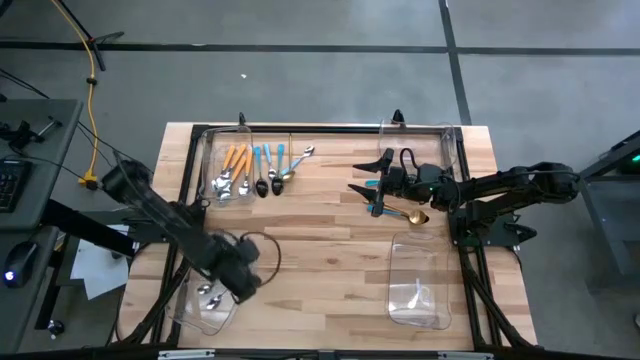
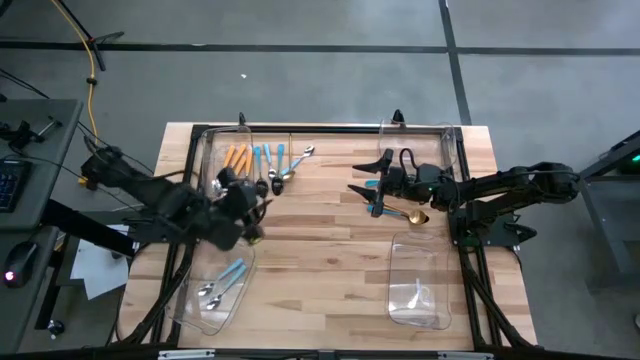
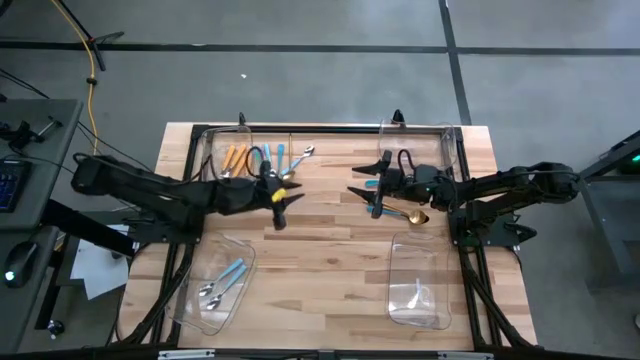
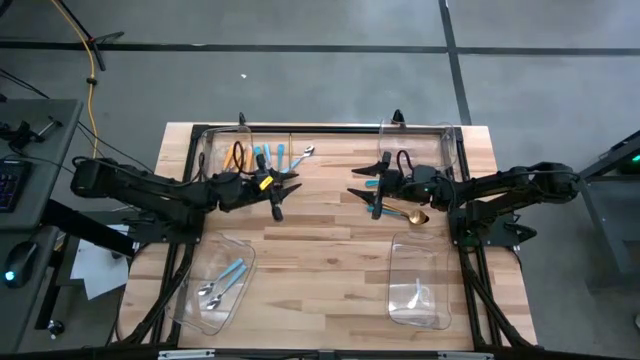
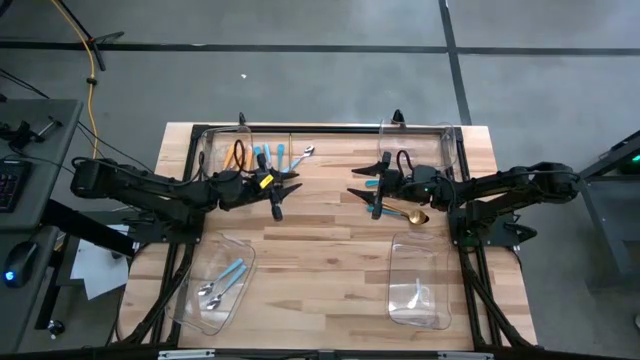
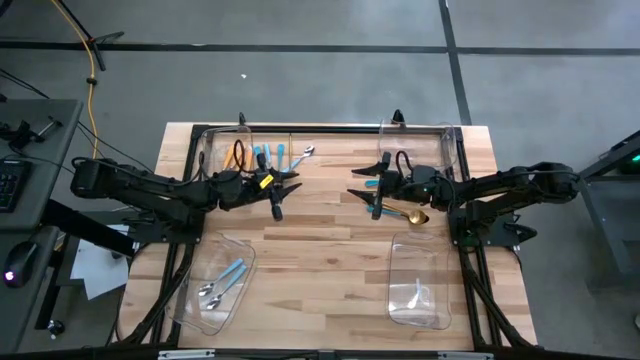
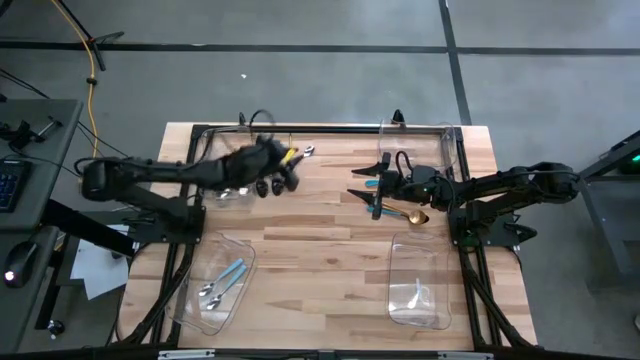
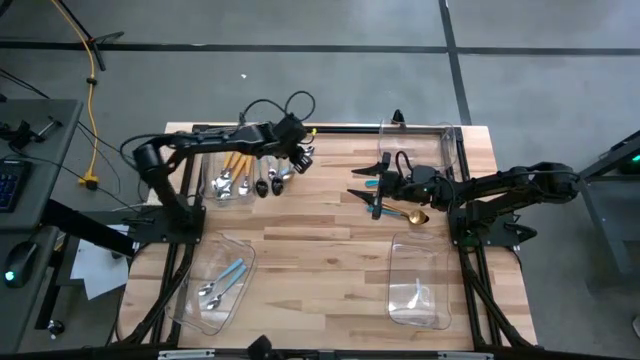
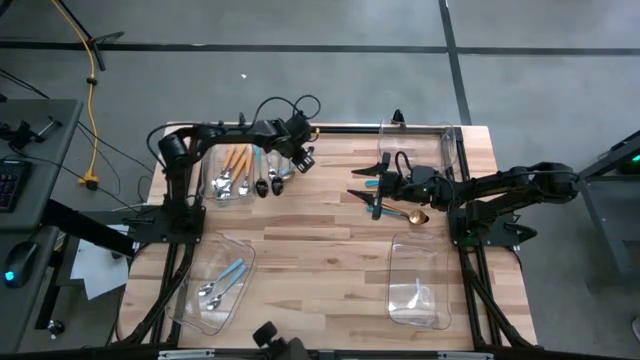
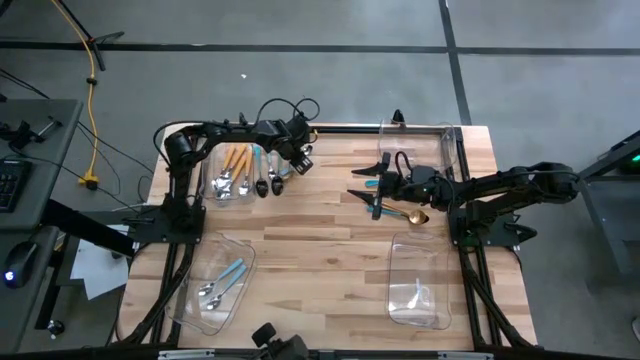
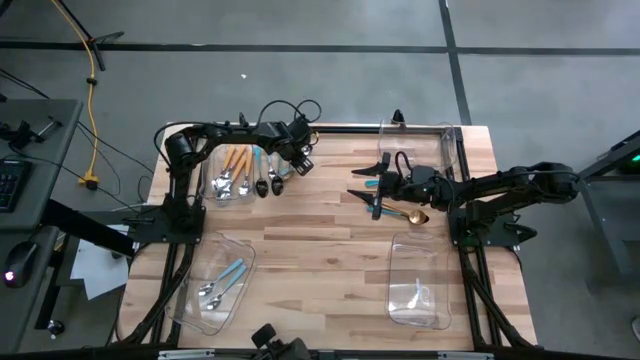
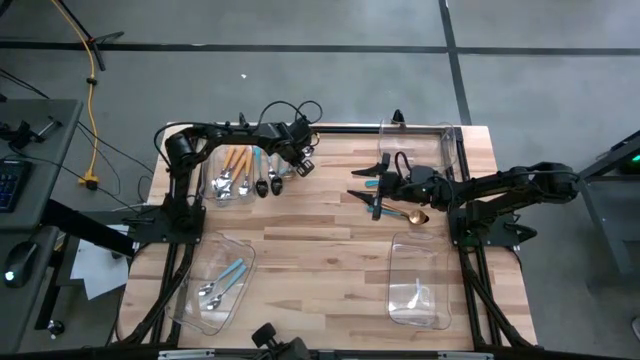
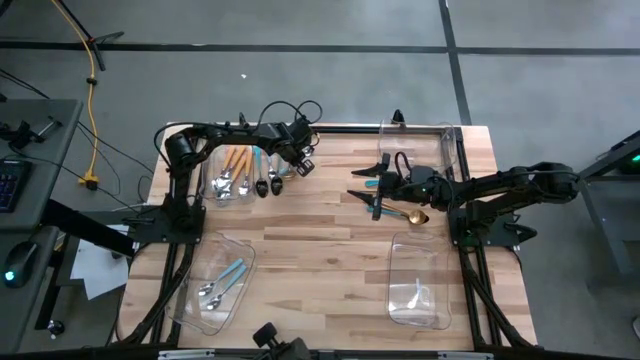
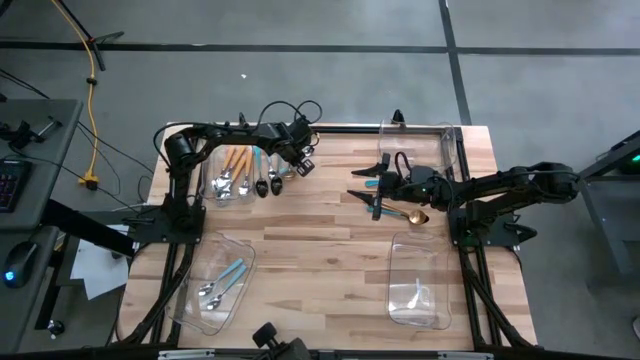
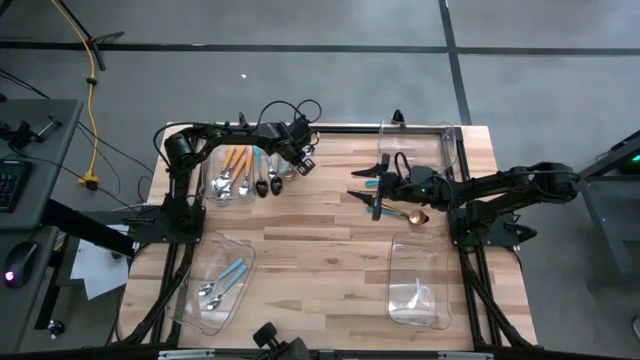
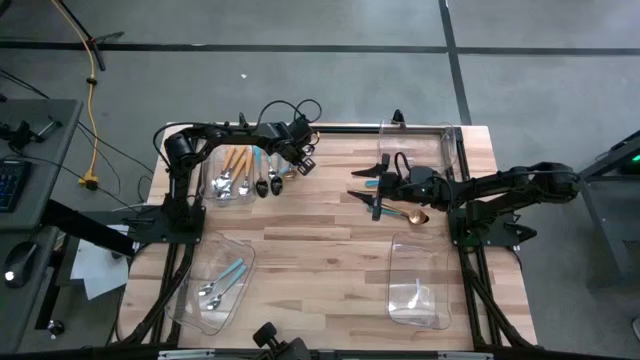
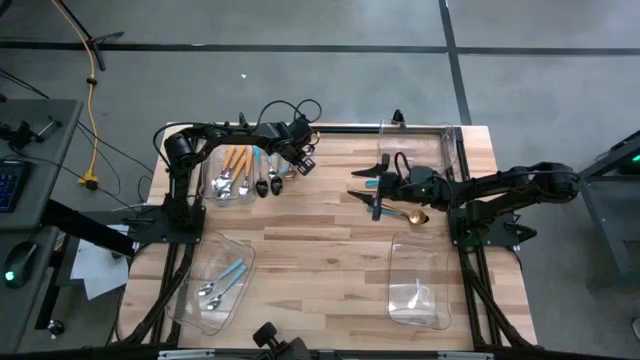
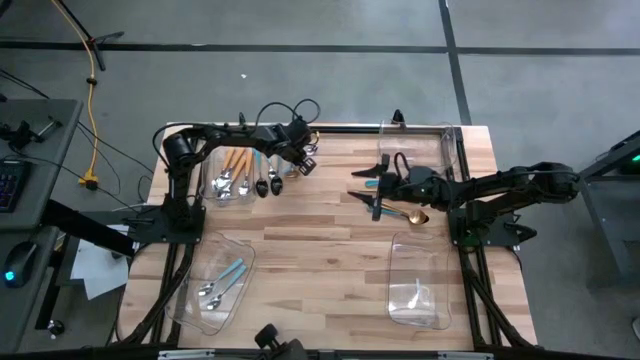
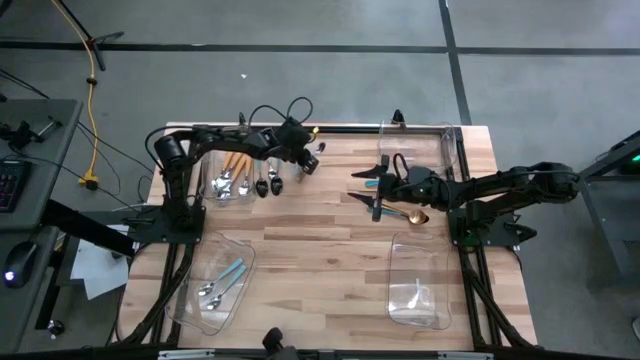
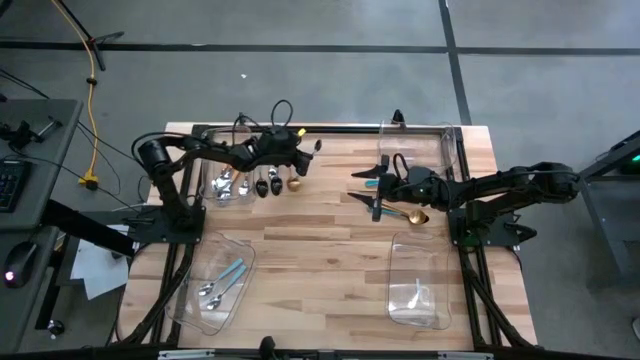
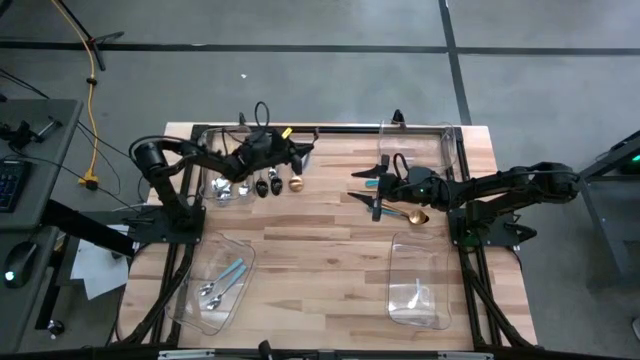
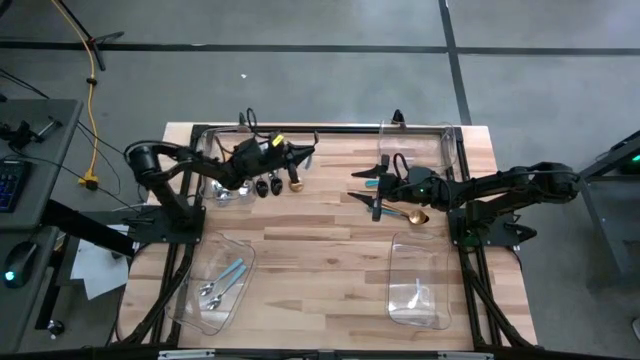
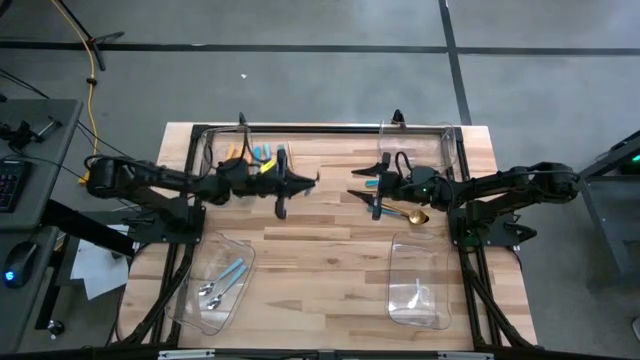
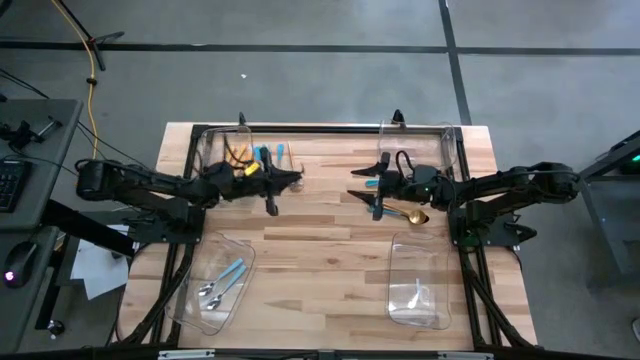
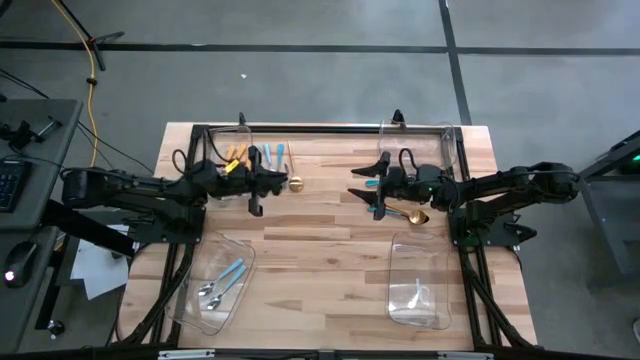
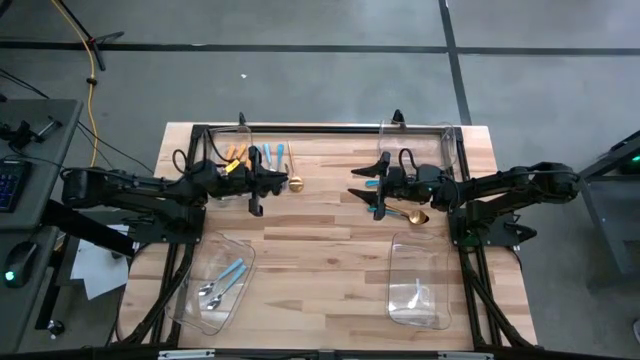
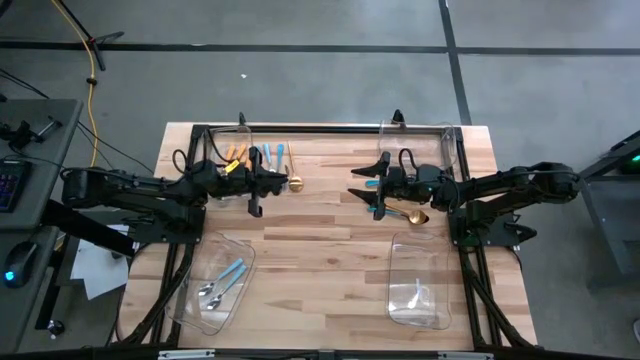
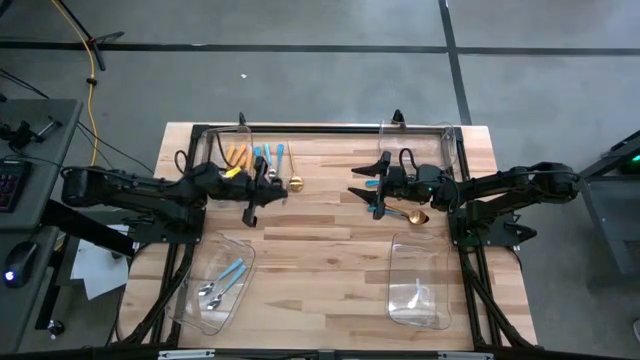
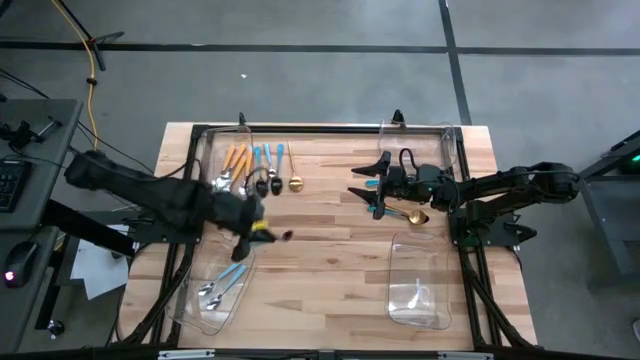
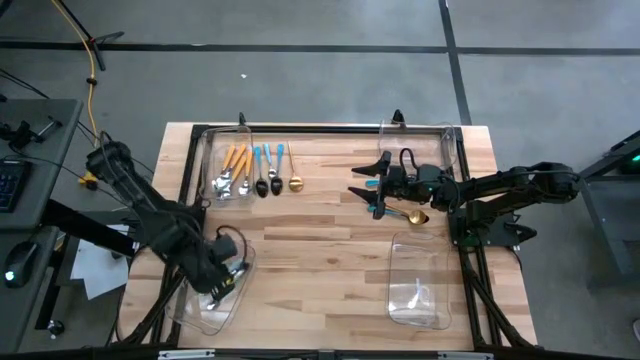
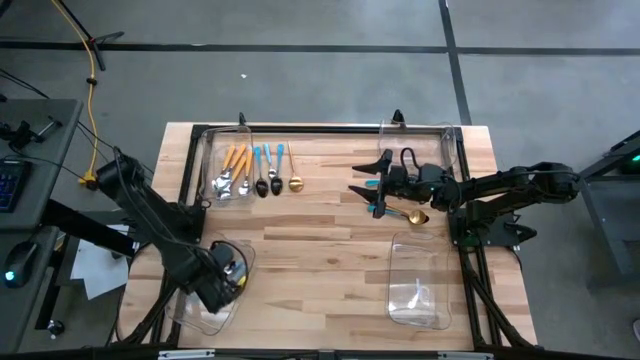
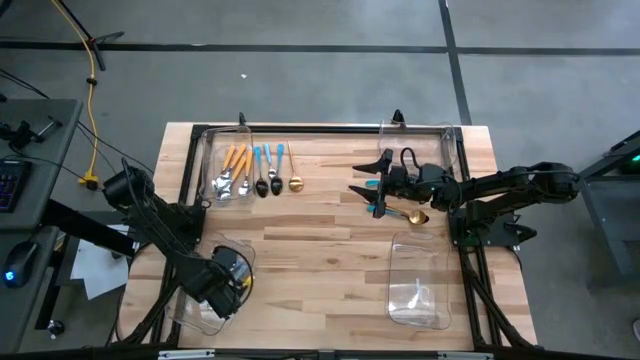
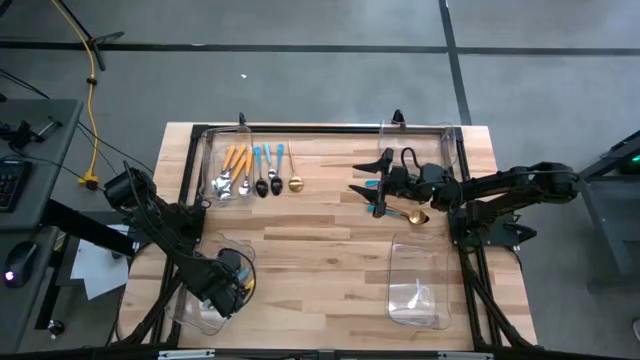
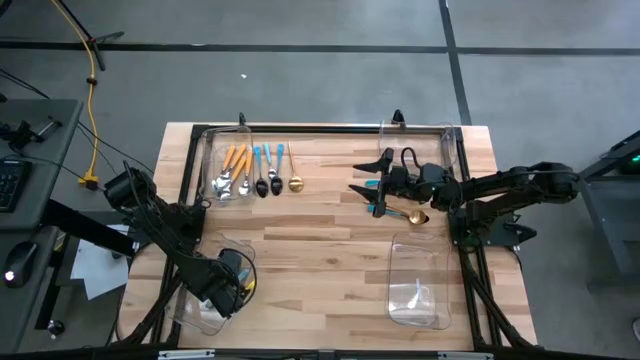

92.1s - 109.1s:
Task: Sort silverware by color (type)
Put the light blue spoon into the bottom left transparent bin

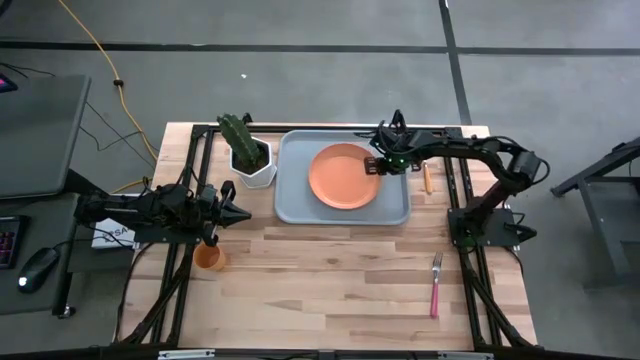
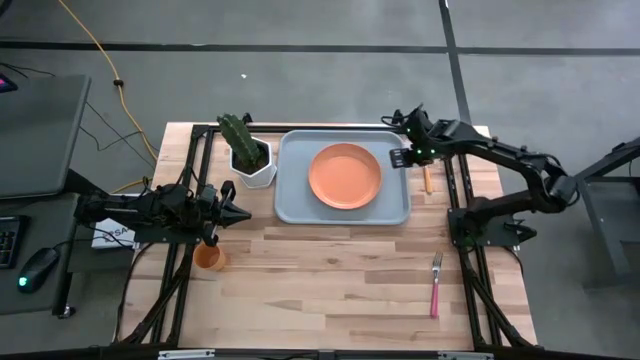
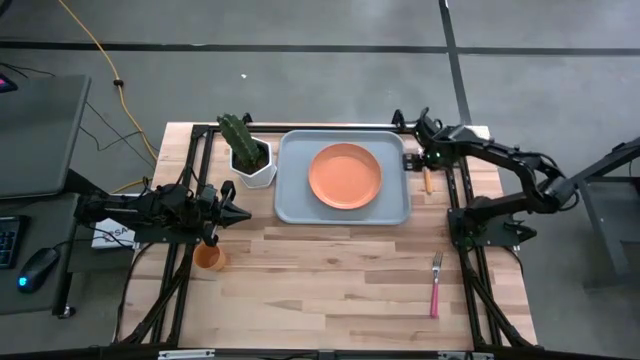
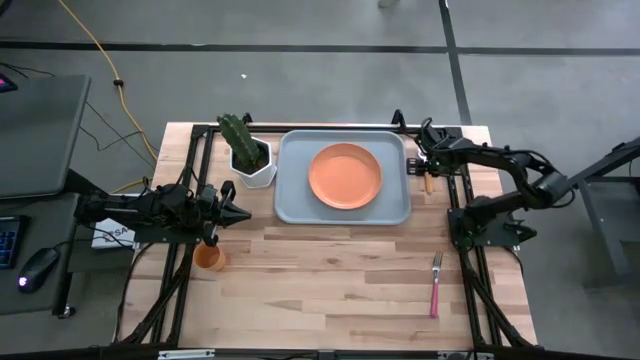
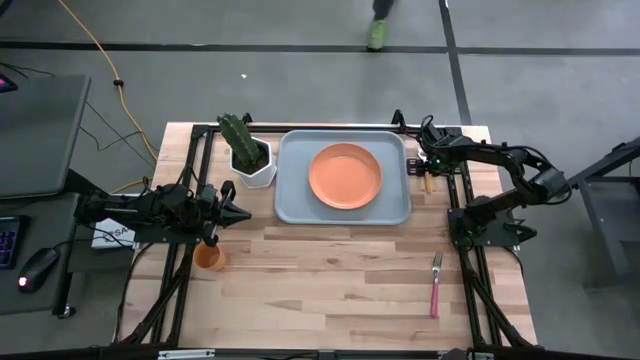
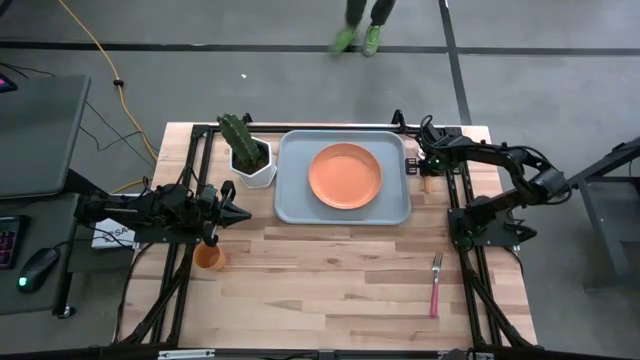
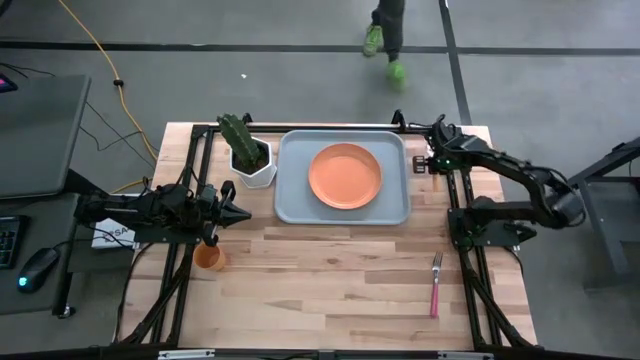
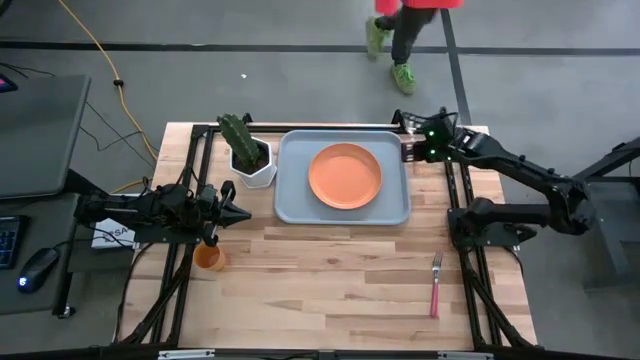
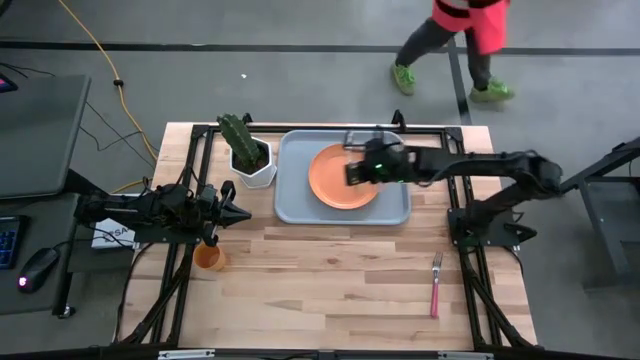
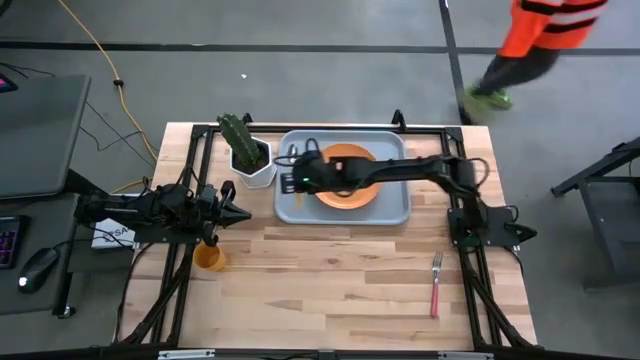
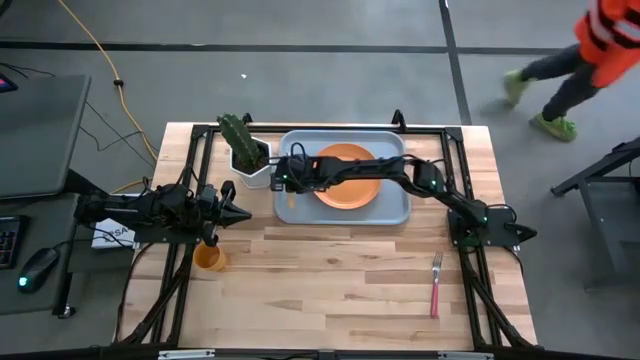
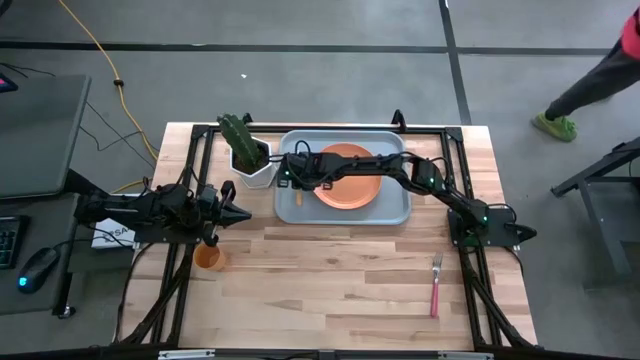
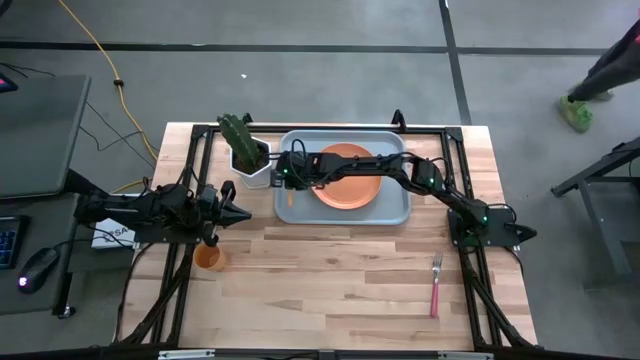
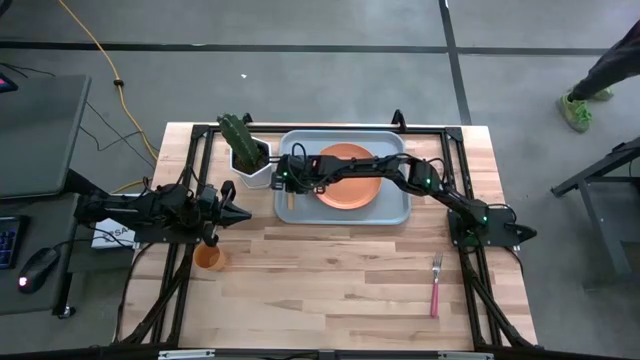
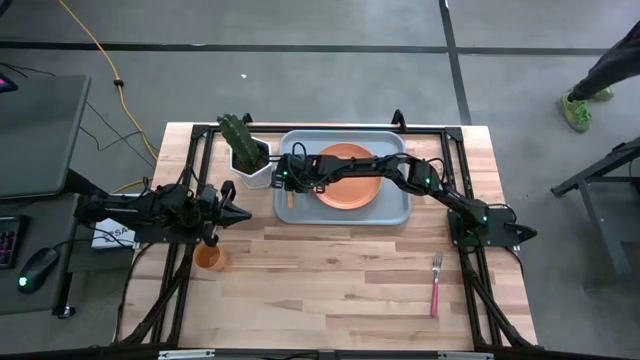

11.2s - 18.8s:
Task: Pick and place plate/cup/fork/spoon on tray
Put the yellow spoon on the gray serving tray to the left of the orange plate
